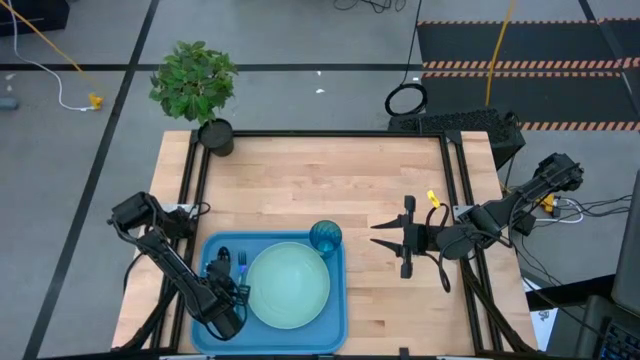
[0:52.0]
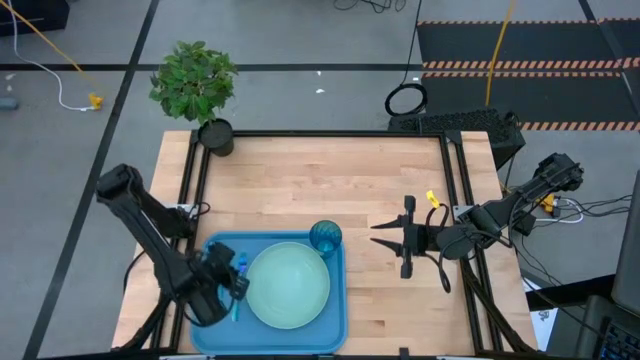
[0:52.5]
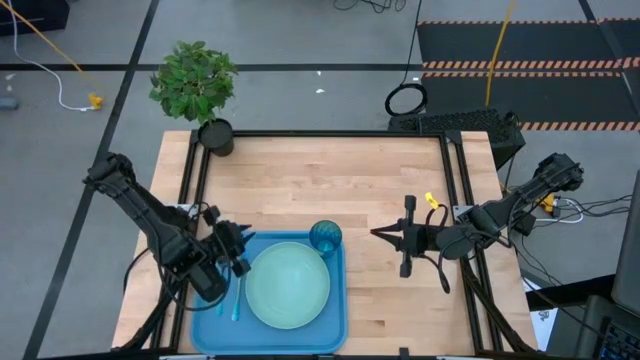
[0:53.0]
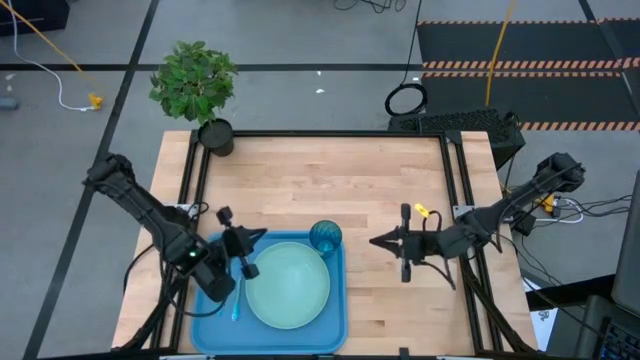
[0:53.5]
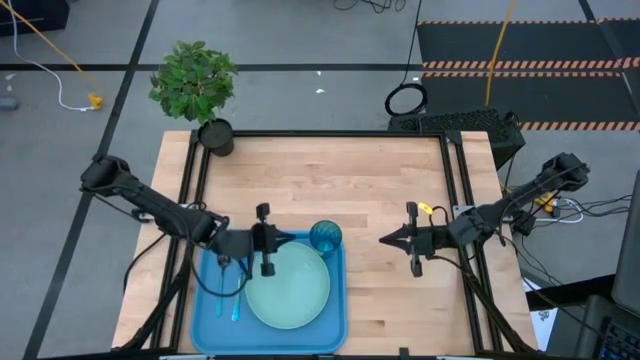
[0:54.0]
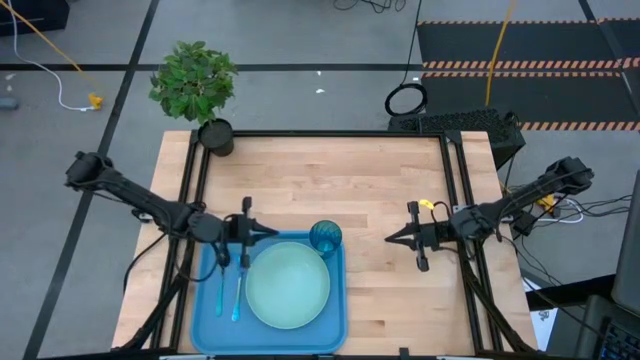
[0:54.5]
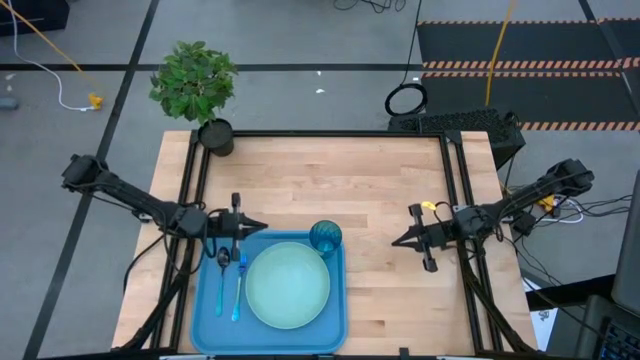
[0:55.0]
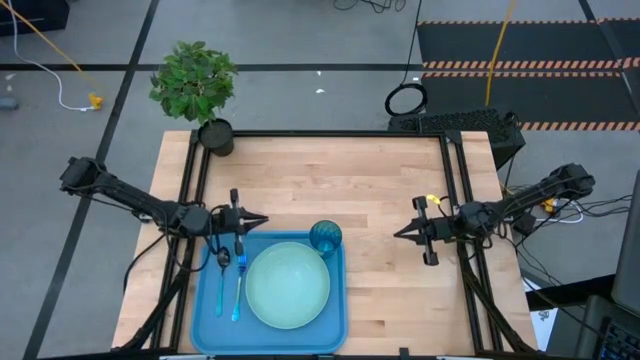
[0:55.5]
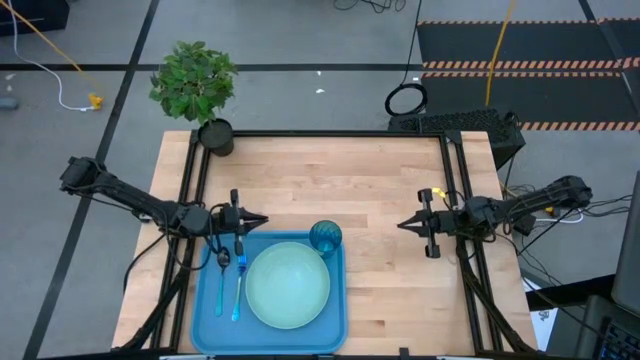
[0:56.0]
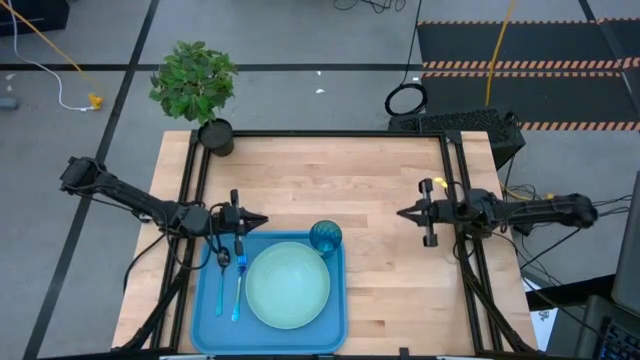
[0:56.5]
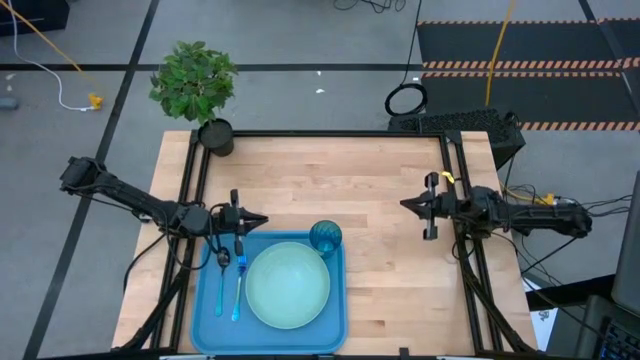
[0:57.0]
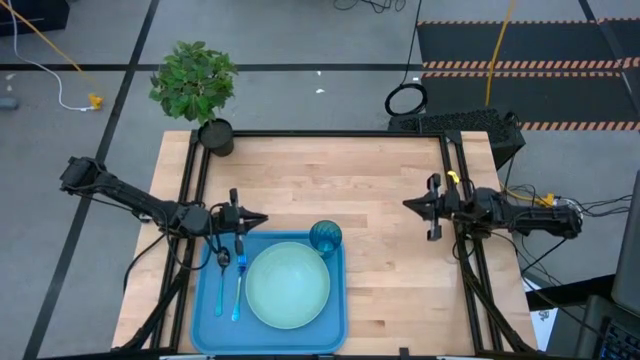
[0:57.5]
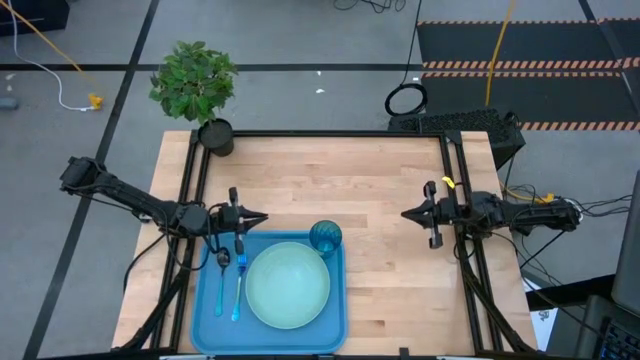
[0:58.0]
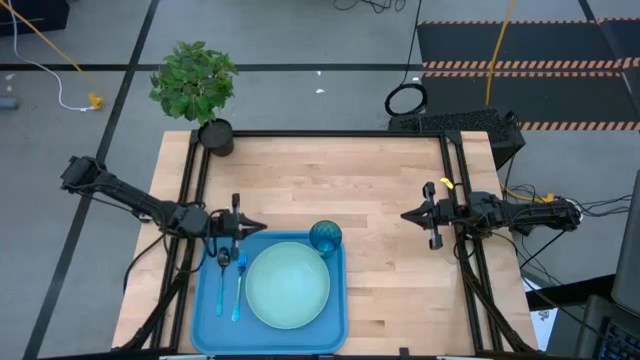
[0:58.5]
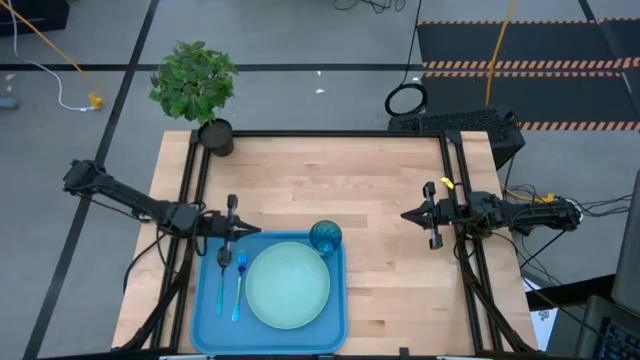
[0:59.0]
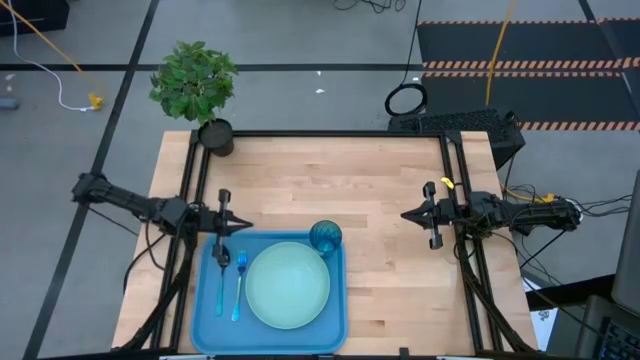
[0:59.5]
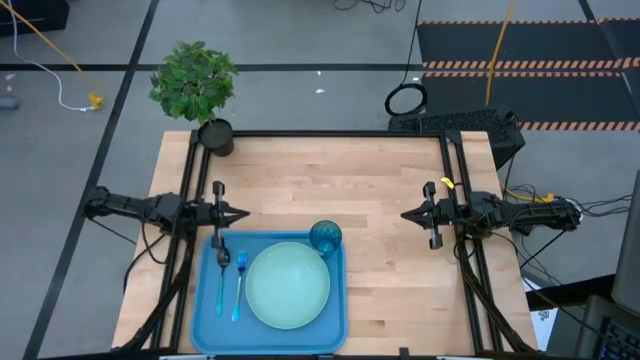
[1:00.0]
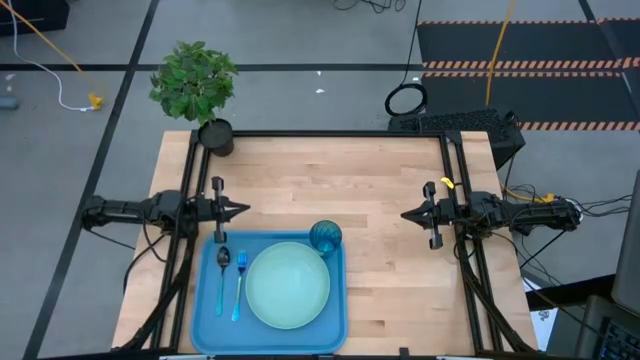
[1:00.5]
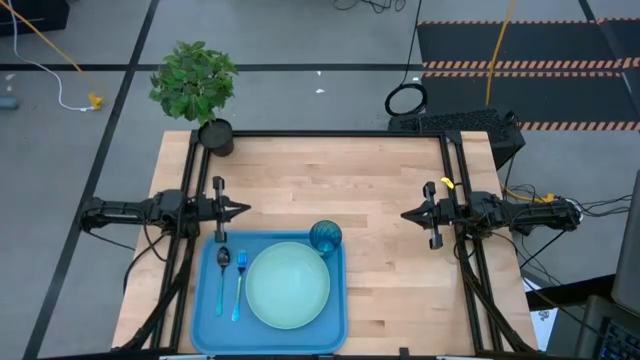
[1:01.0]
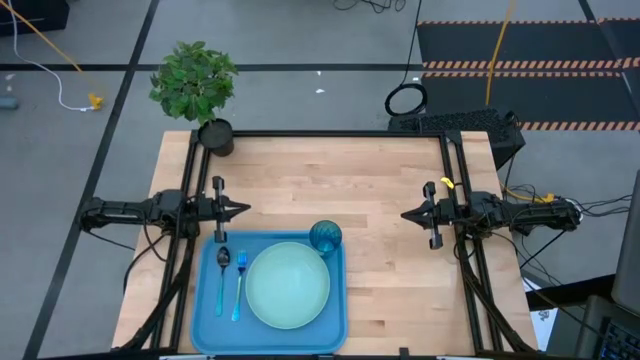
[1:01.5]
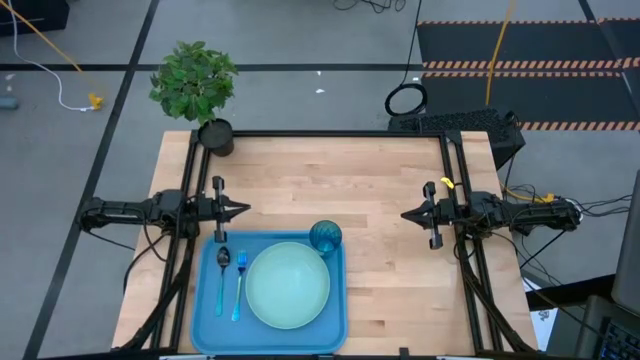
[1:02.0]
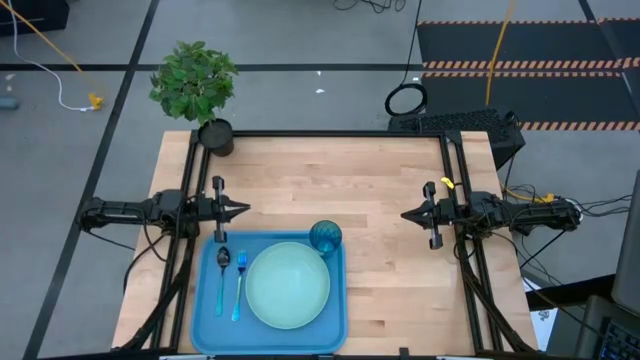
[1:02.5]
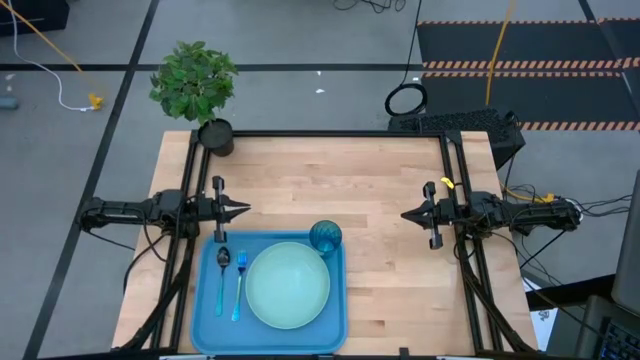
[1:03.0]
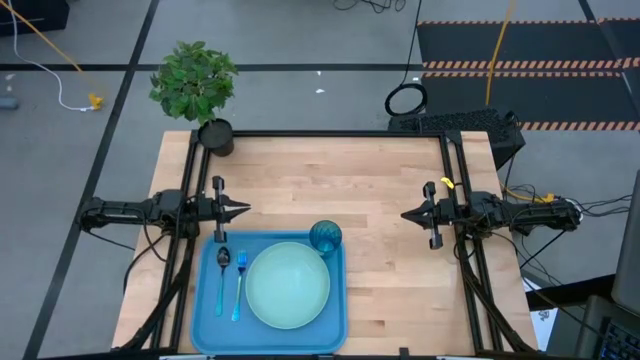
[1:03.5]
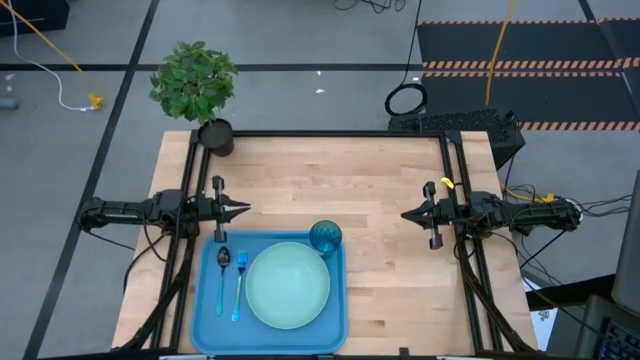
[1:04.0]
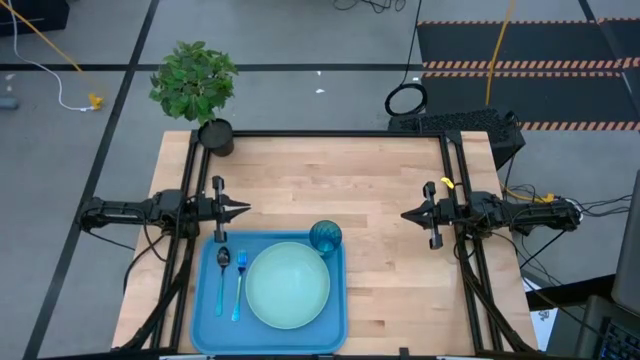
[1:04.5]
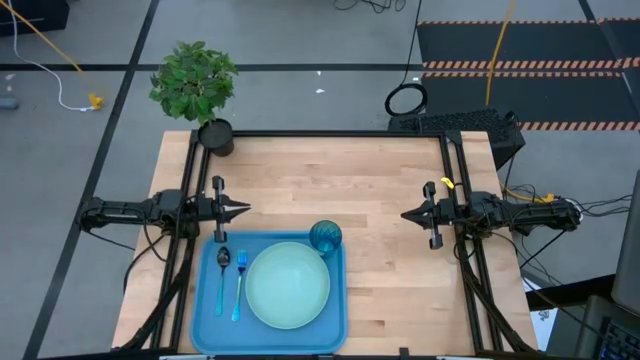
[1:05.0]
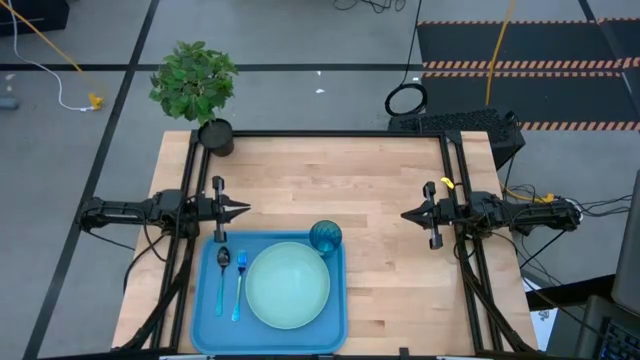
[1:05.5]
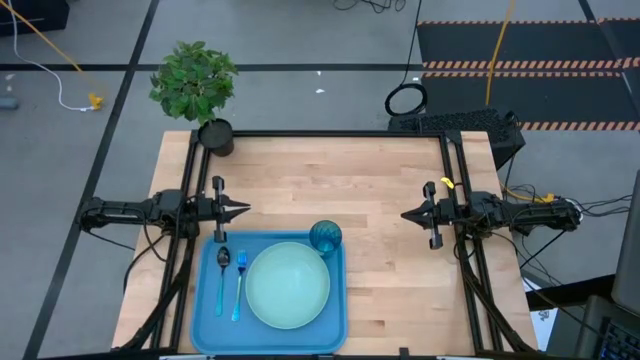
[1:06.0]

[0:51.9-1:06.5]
Task: Pick and place plate/cup/fork/spoon on tray
Return to Home Position

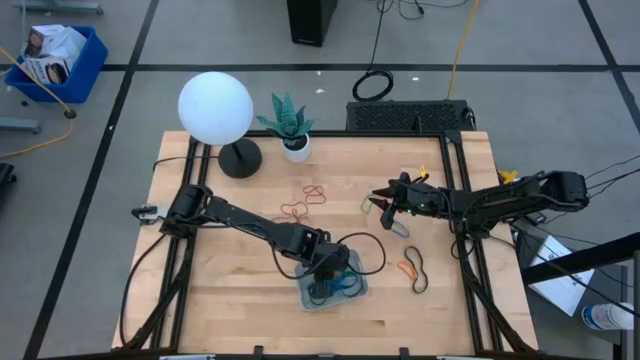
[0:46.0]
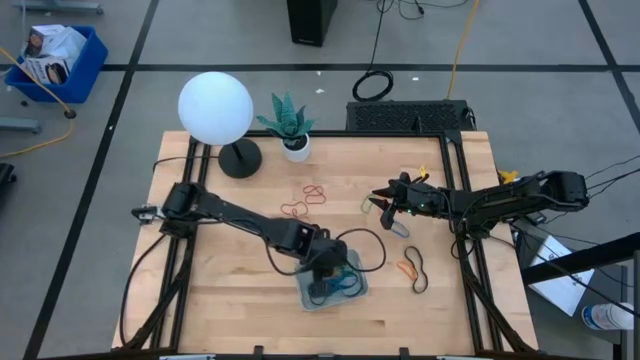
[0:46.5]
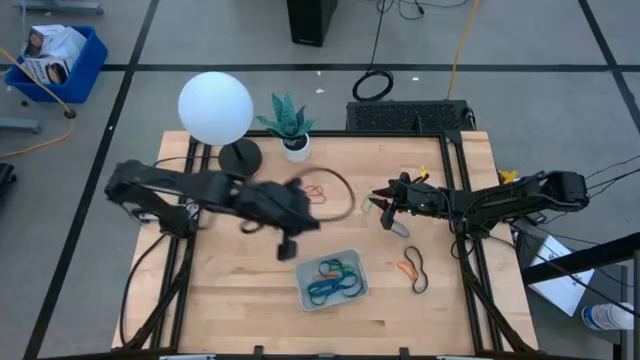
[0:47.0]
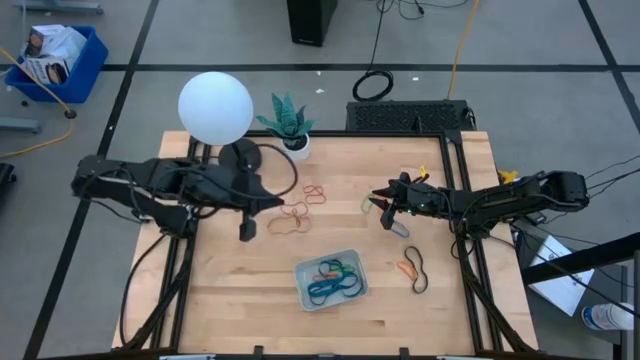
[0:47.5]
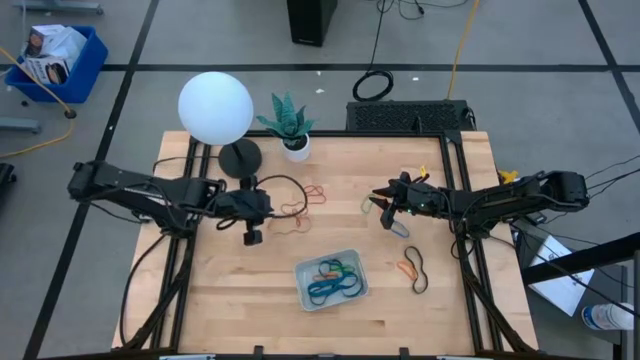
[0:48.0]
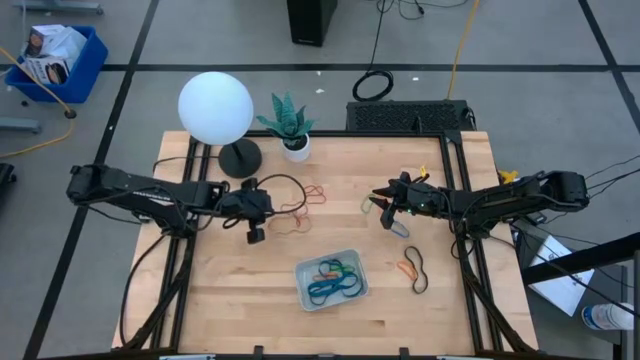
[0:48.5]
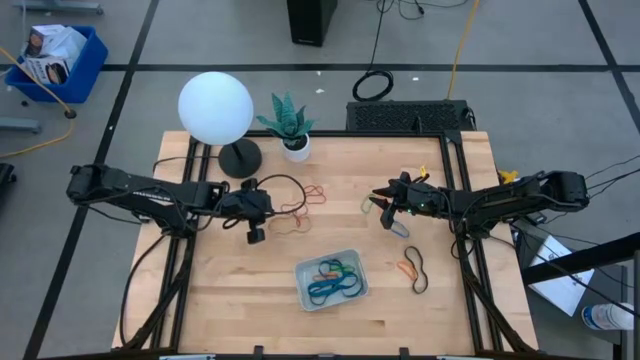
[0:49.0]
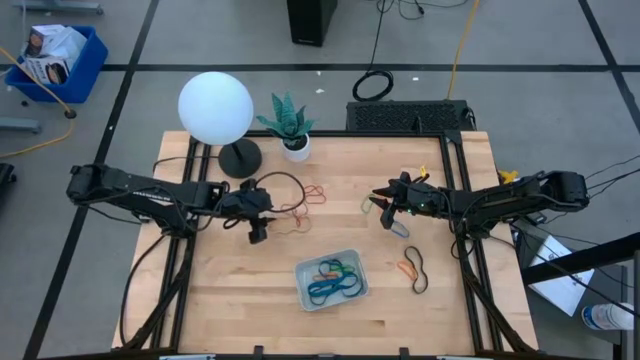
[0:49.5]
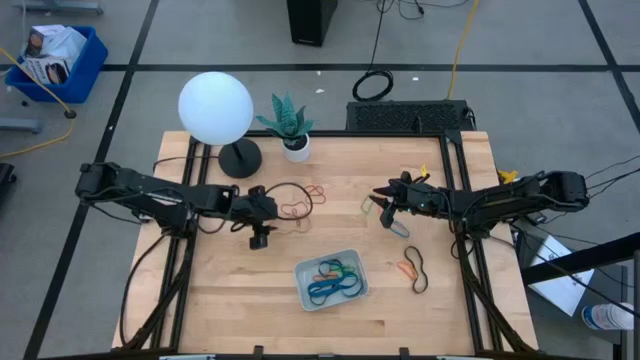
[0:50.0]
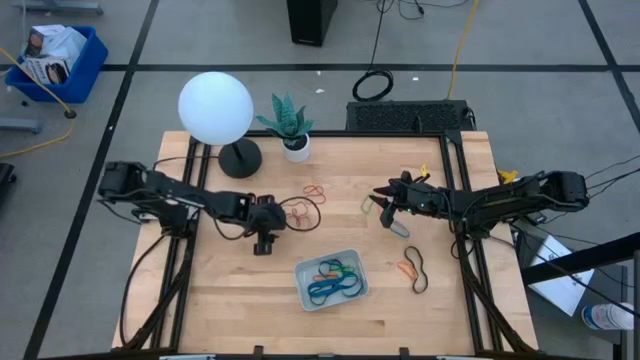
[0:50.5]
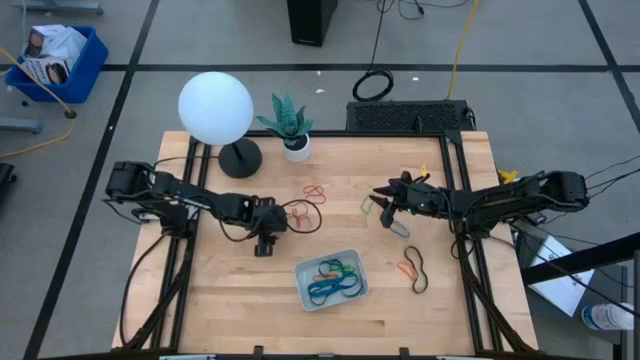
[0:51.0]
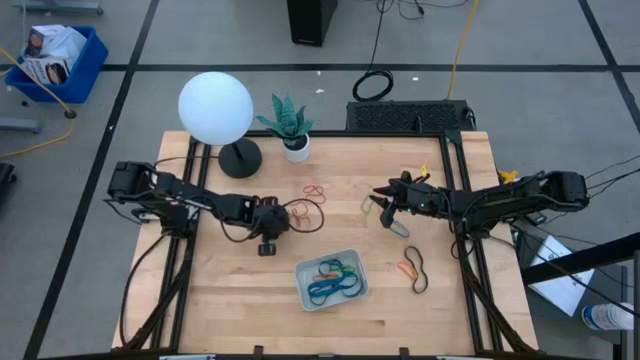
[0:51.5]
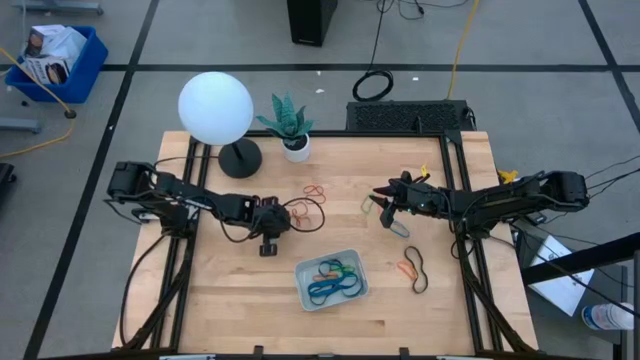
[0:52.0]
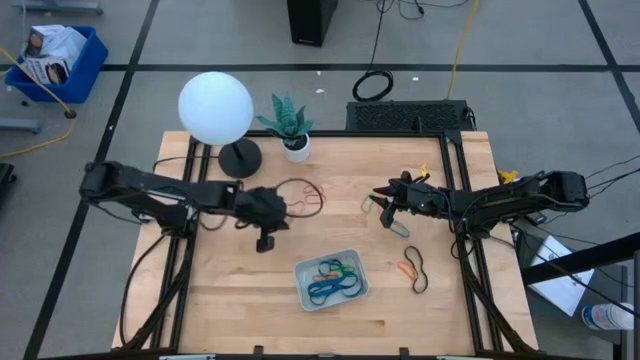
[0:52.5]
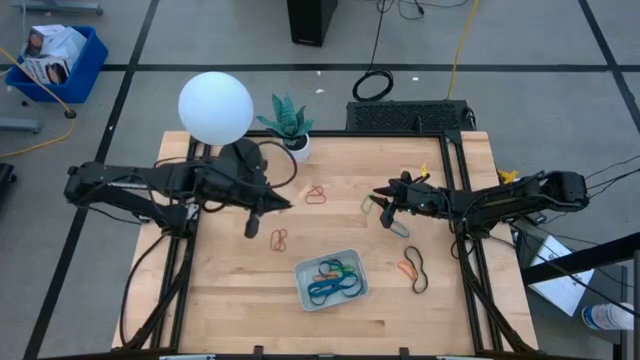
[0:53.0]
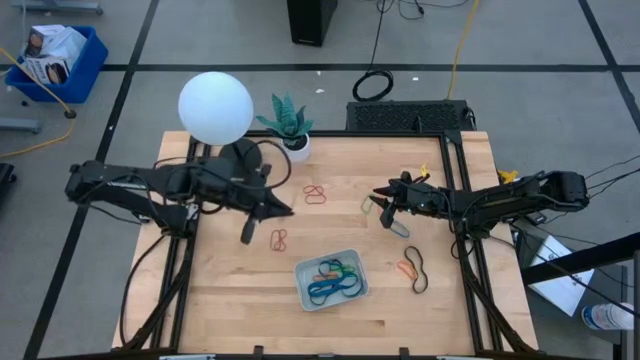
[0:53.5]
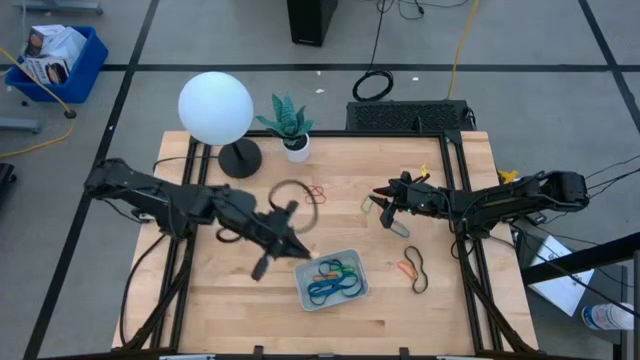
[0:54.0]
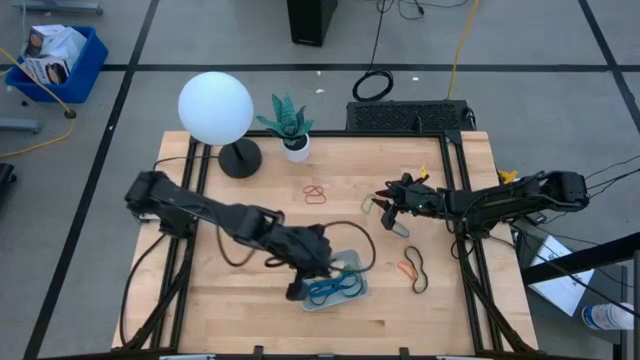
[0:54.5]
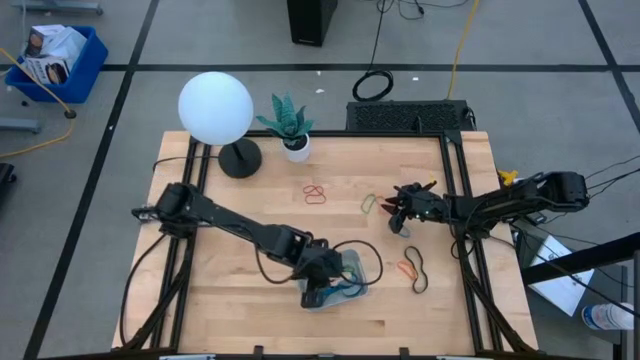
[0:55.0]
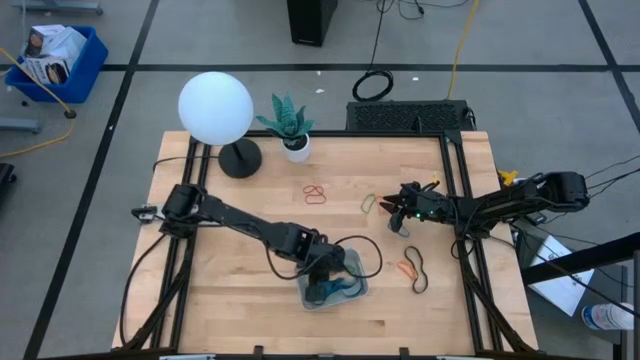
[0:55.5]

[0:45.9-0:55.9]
Task: Pick and place rubber bands into bin
Put the brown rubber band into the gray bin
